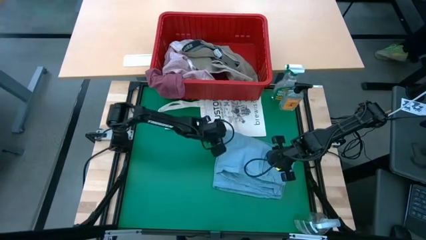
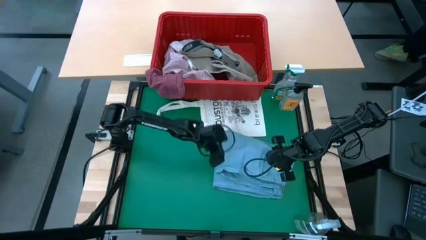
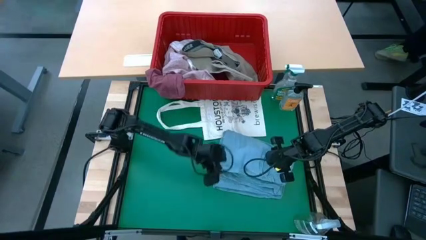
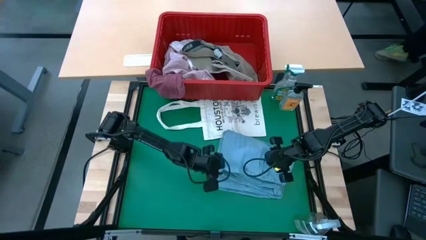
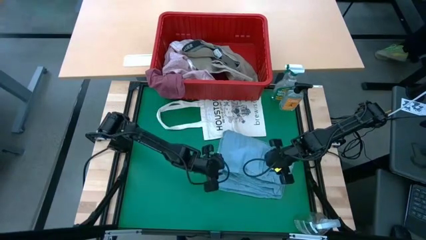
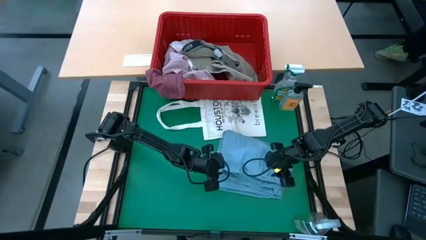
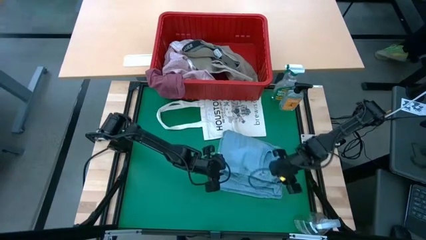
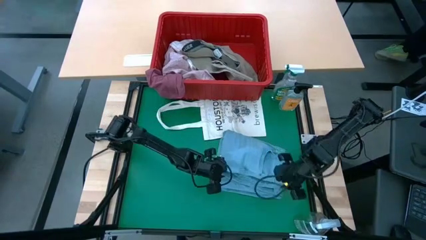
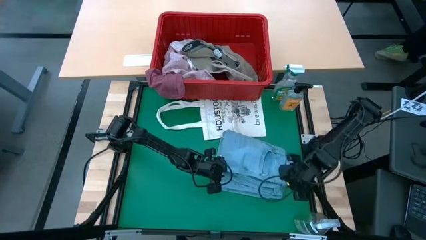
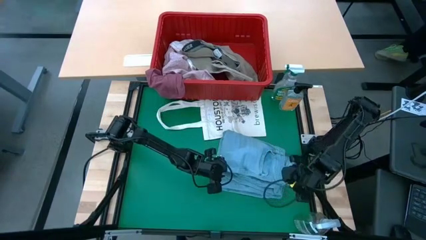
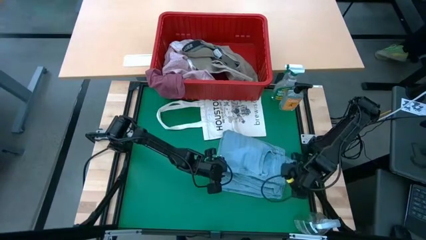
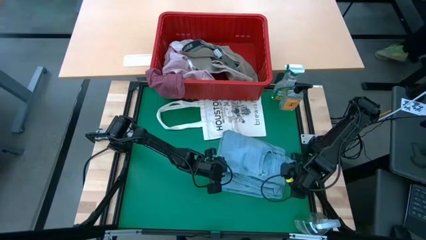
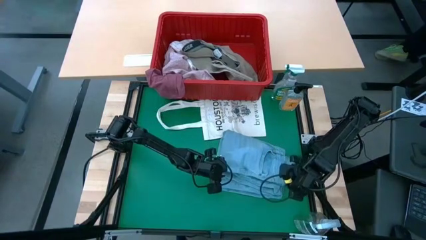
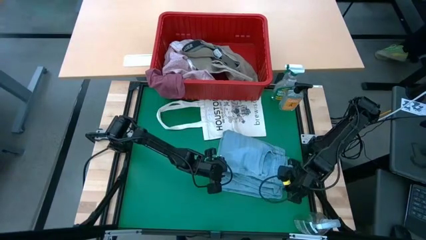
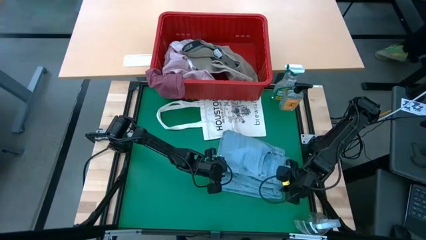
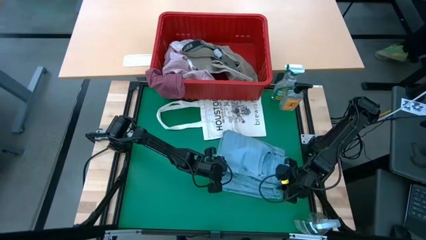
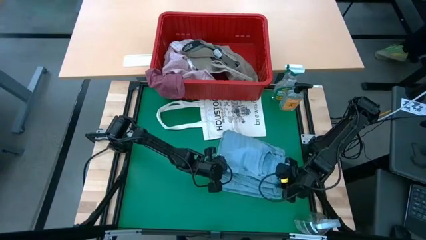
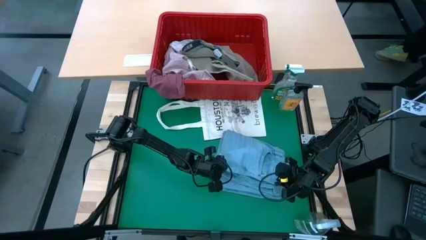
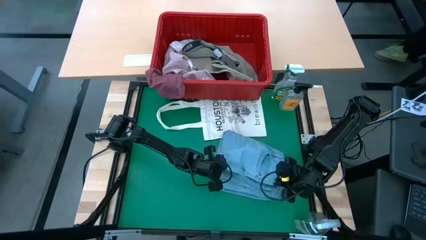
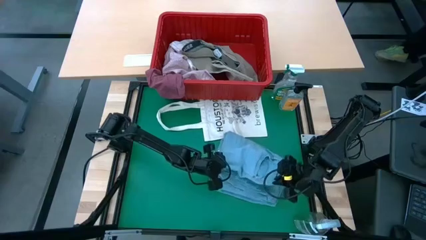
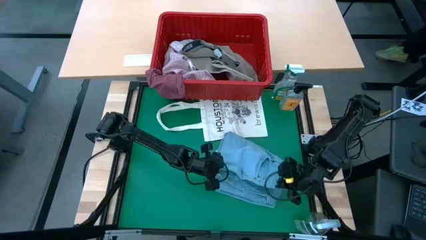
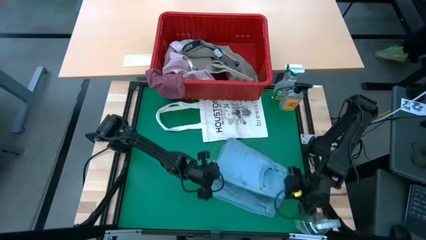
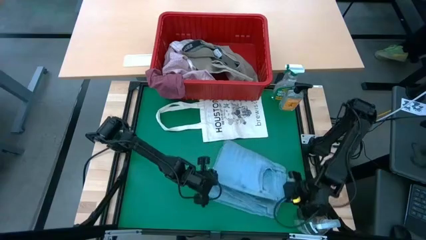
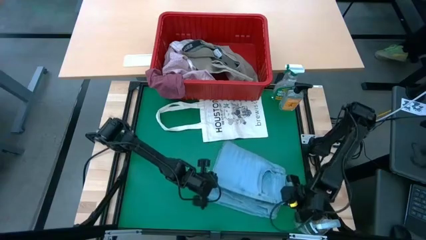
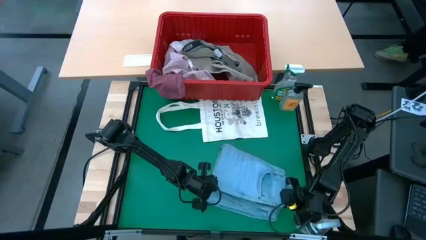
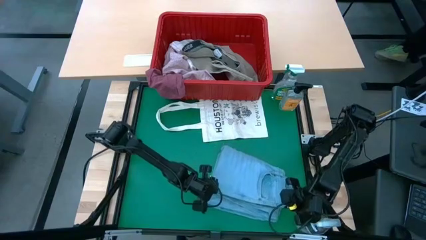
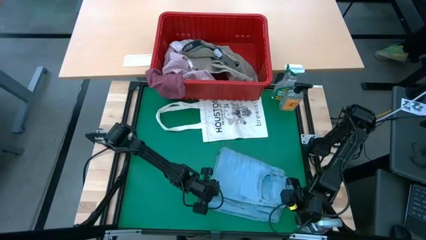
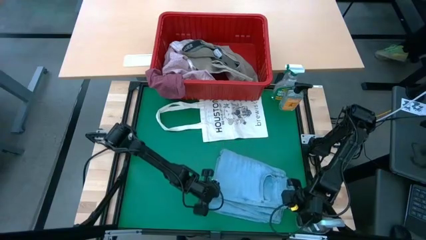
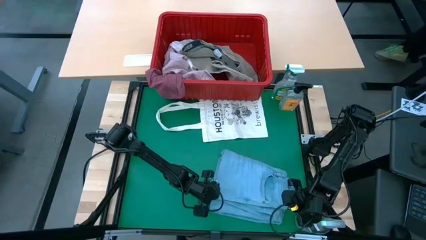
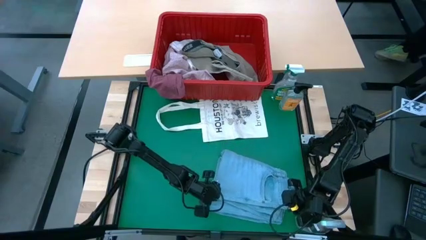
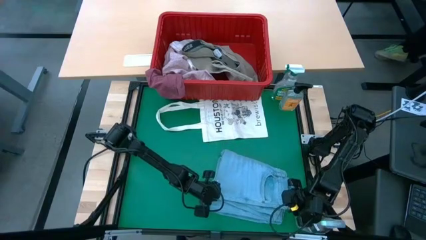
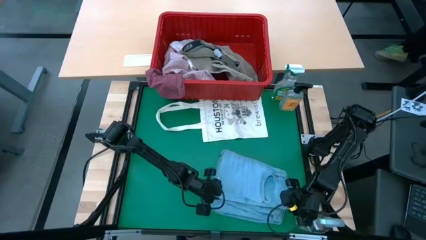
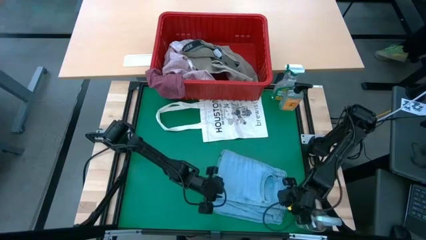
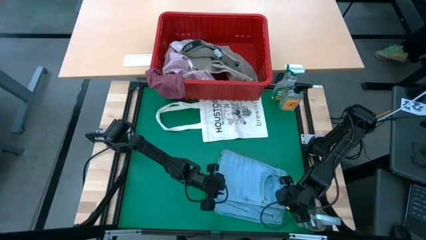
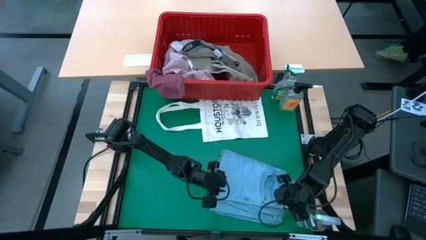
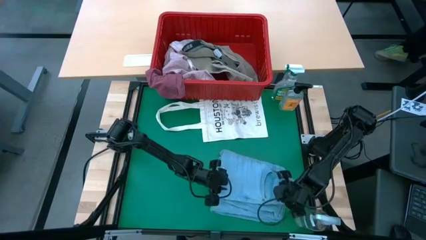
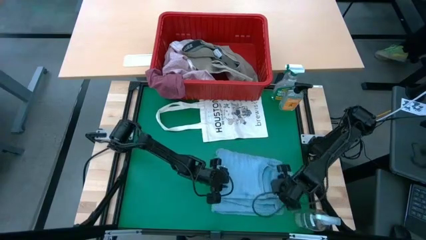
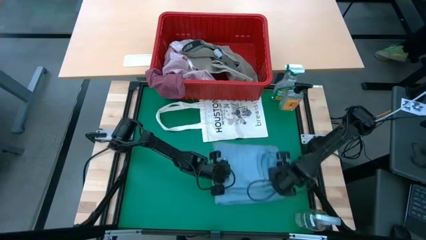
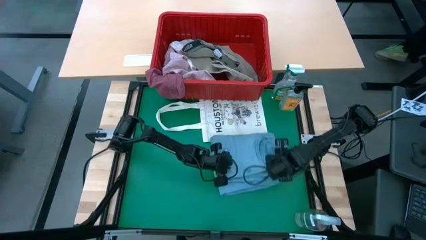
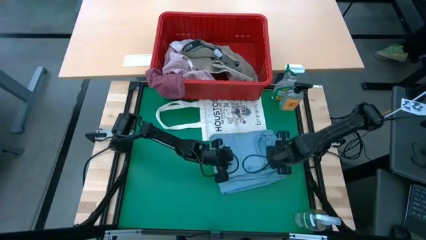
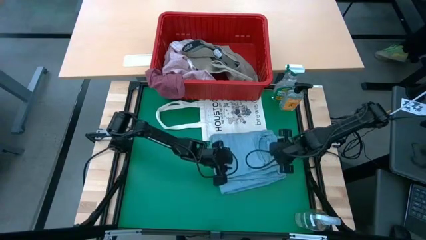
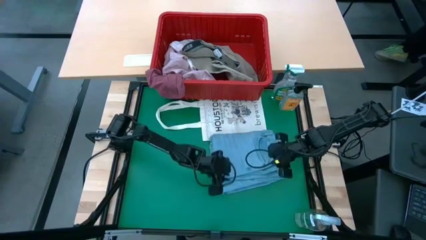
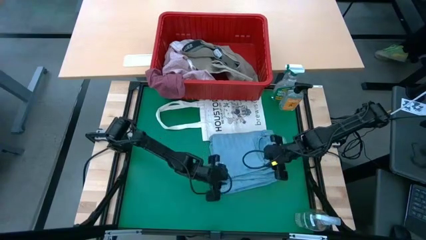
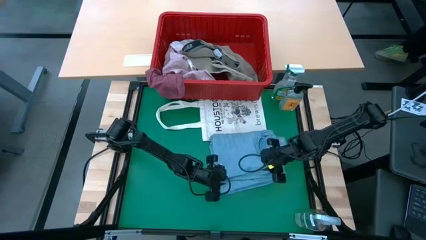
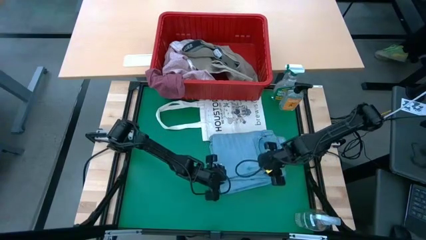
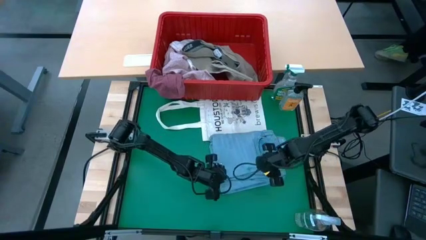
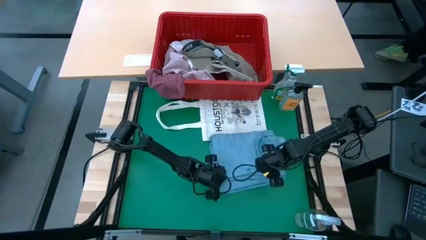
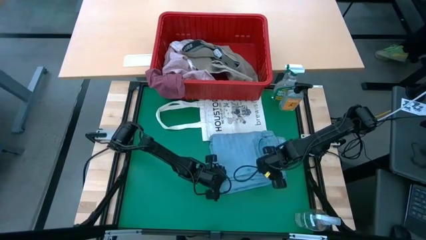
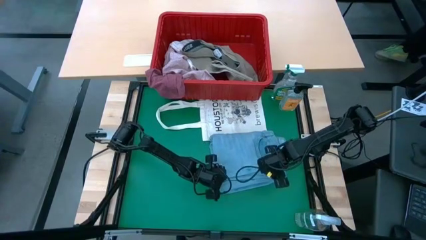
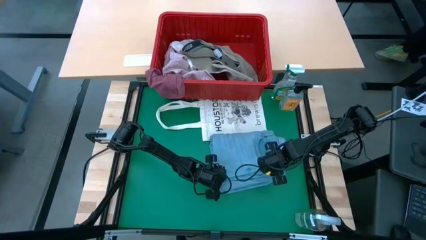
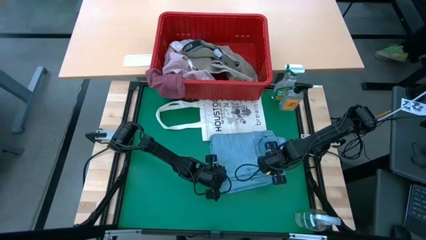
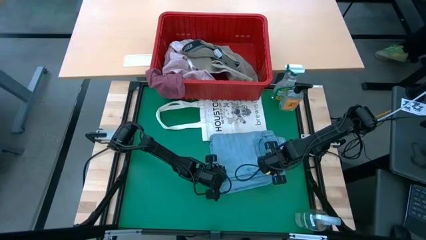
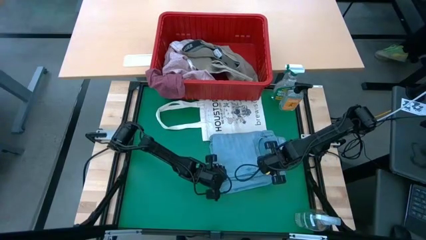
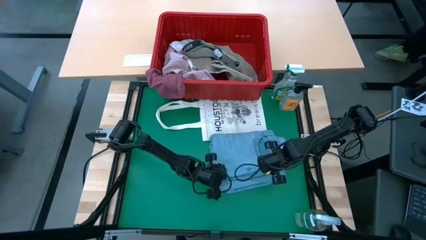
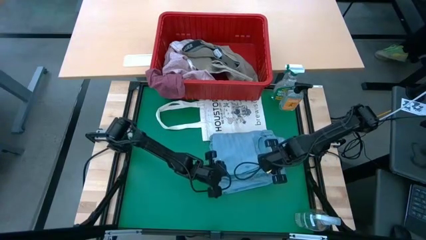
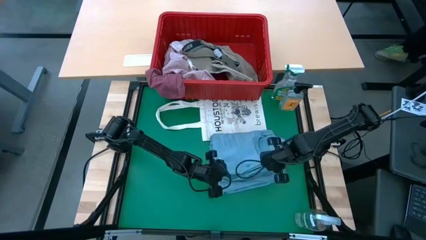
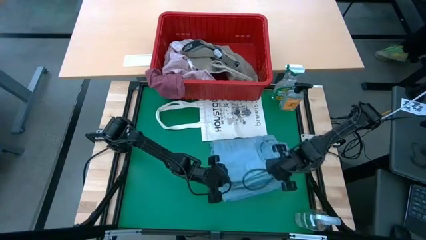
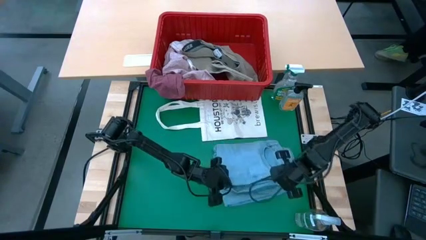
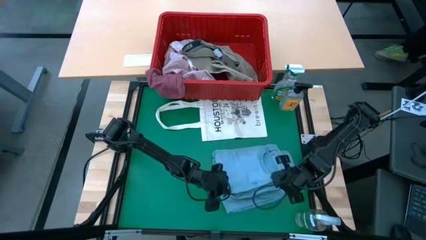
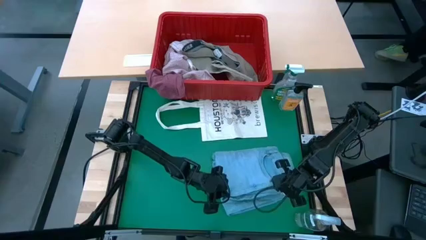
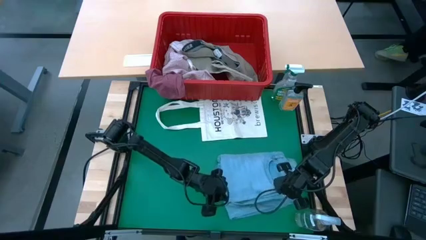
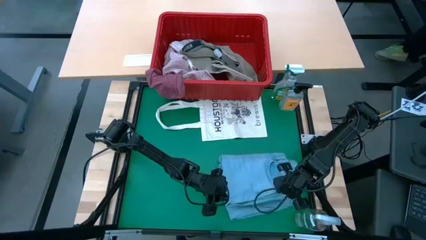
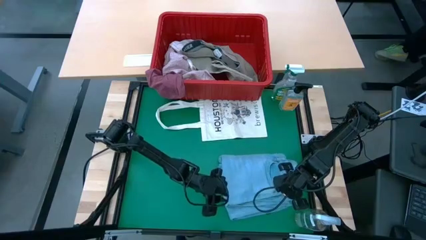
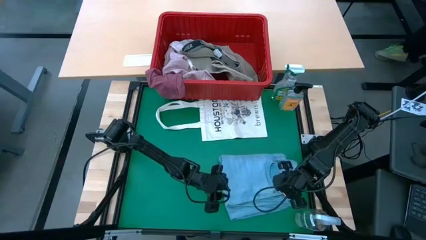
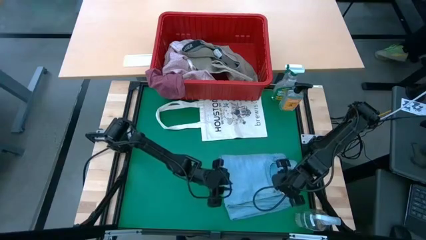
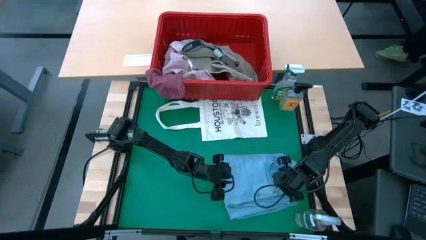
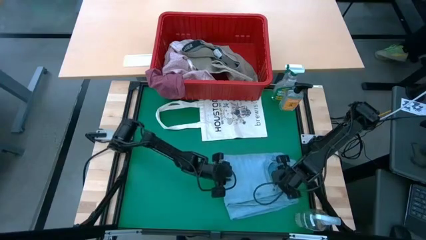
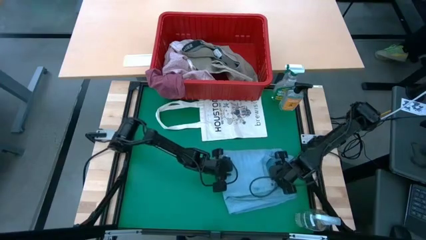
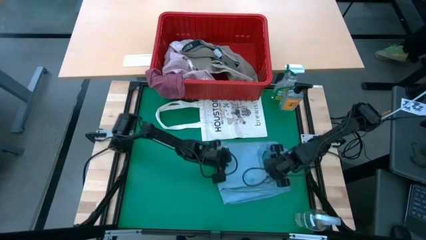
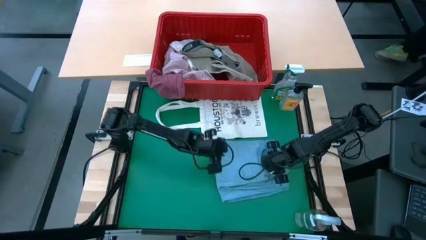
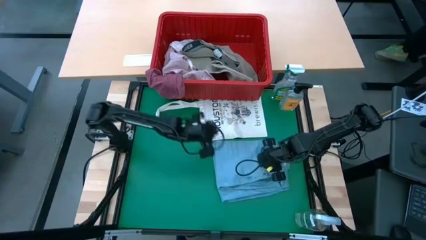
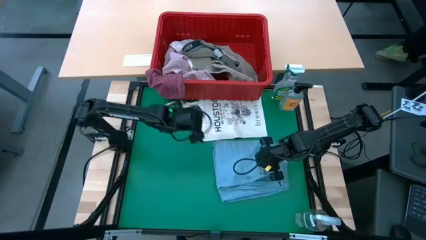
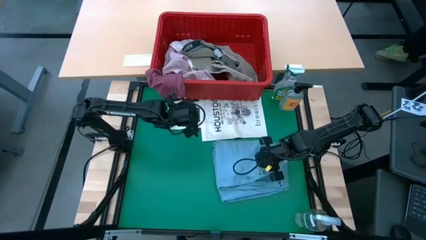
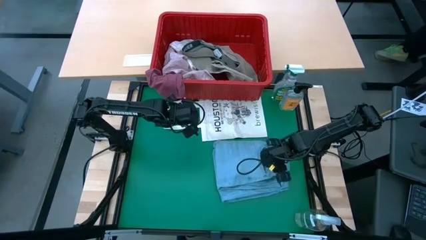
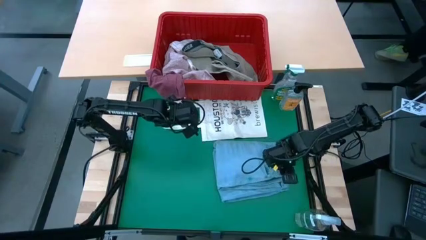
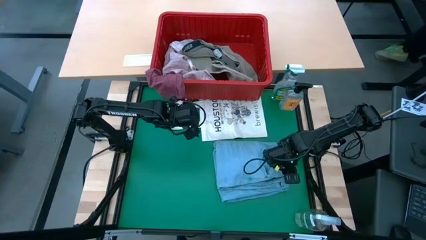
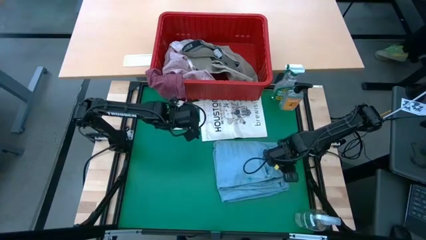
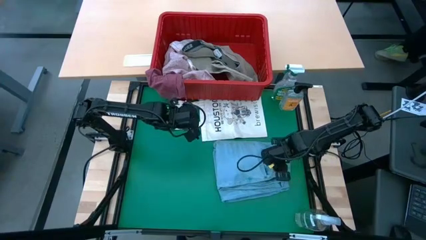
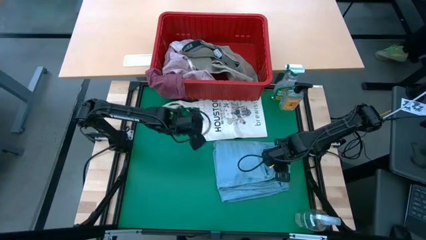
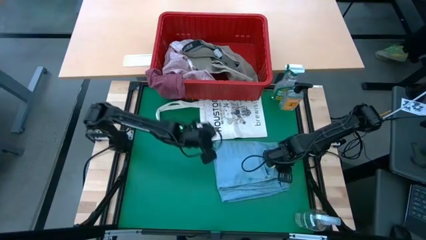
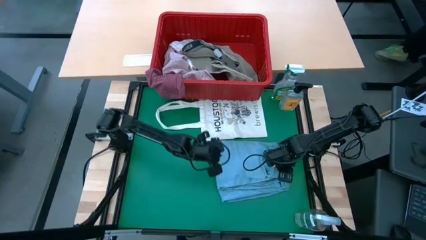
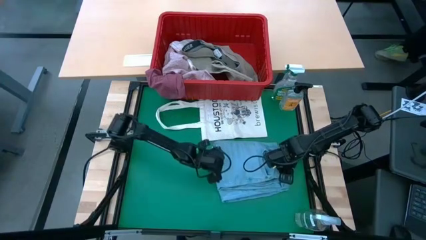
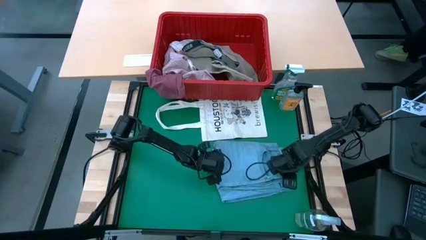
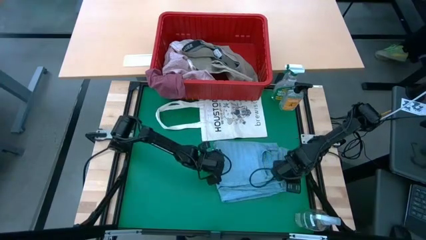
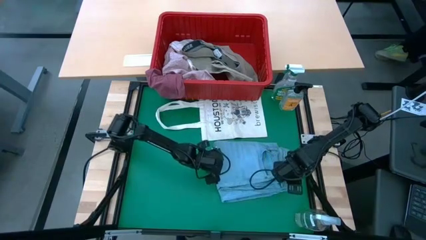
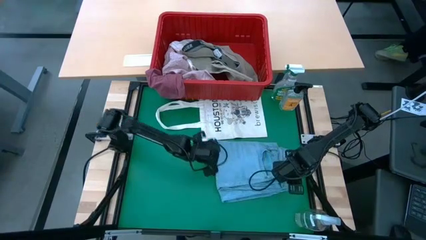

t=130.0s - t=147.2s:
Task: Fold Laundry from Bin
Fold the blue pants from the red laundry basket
